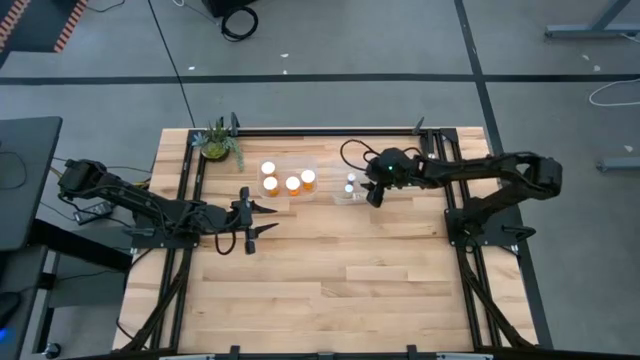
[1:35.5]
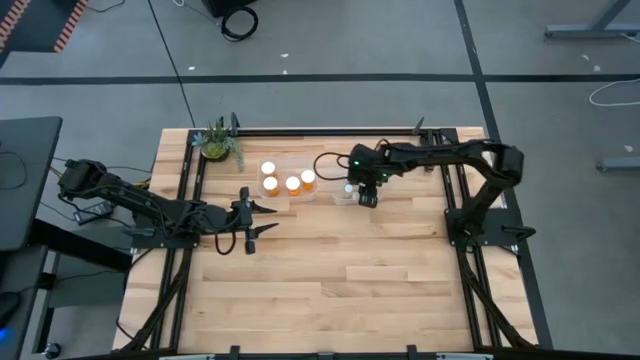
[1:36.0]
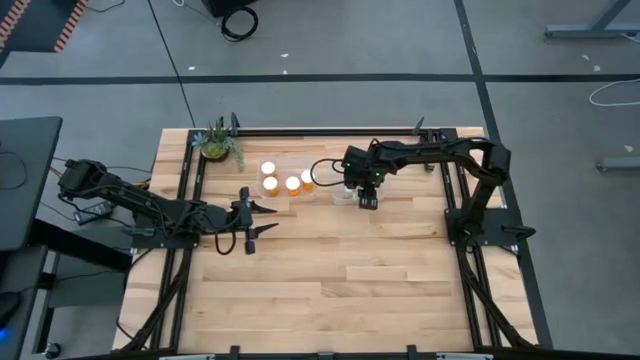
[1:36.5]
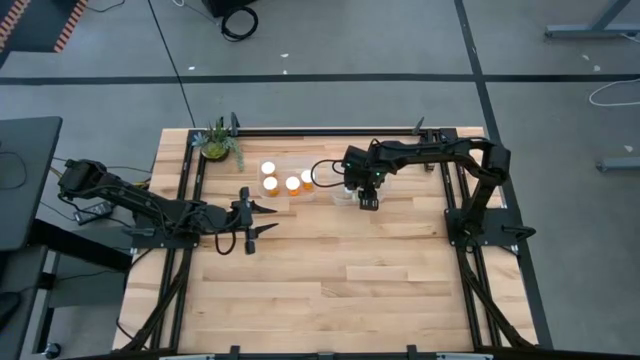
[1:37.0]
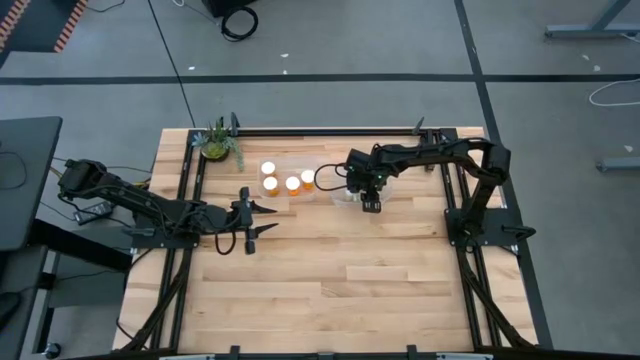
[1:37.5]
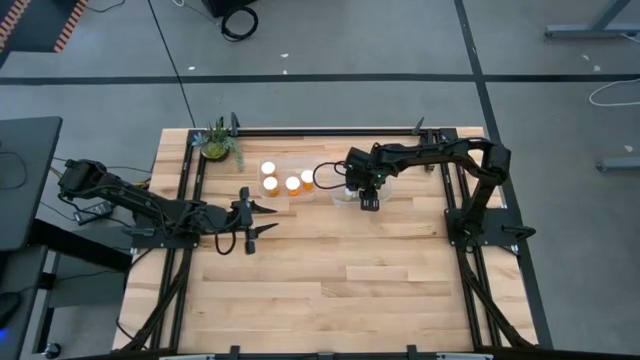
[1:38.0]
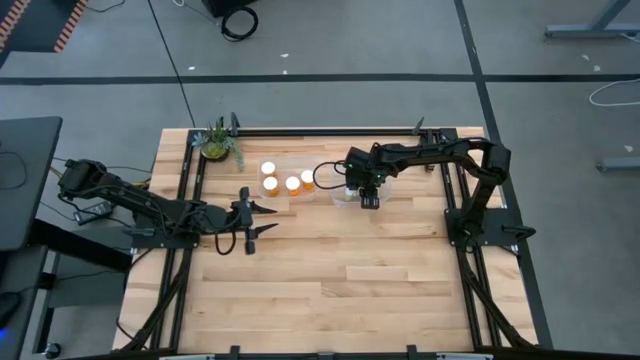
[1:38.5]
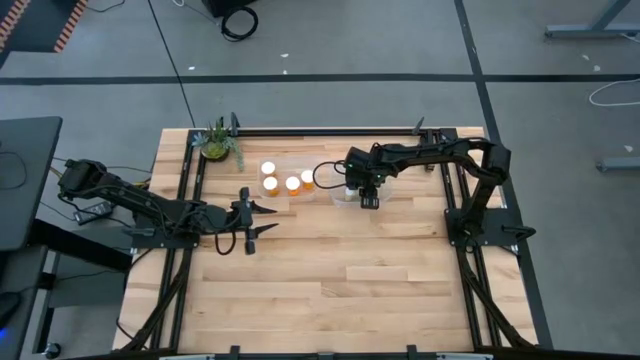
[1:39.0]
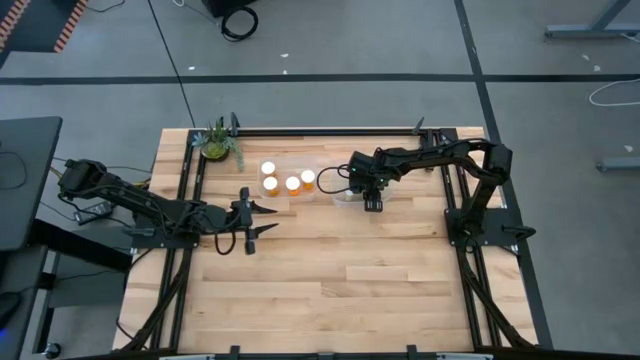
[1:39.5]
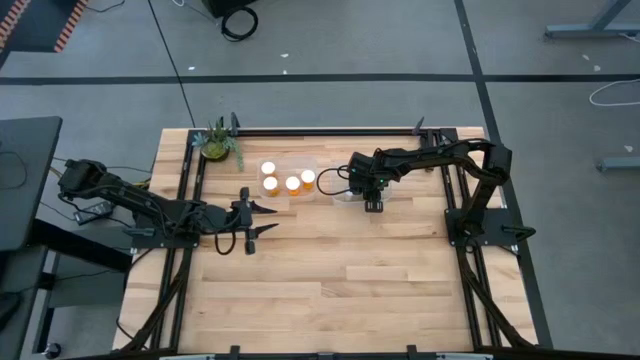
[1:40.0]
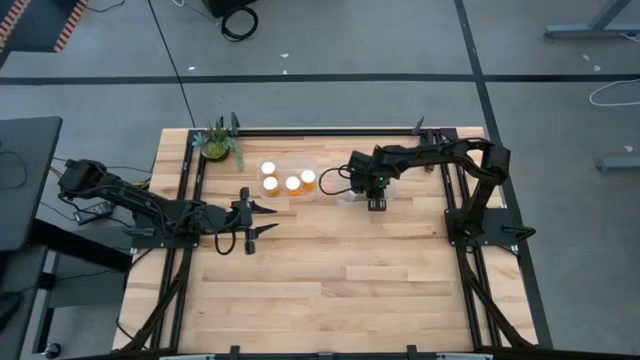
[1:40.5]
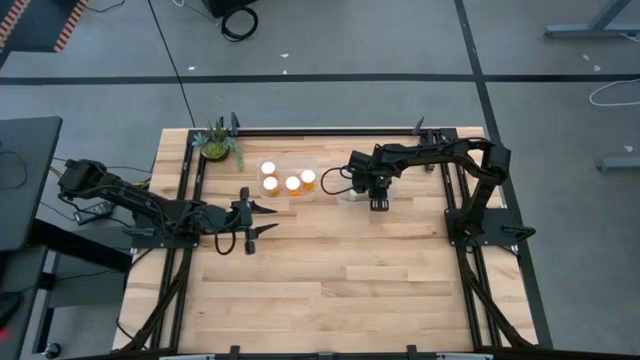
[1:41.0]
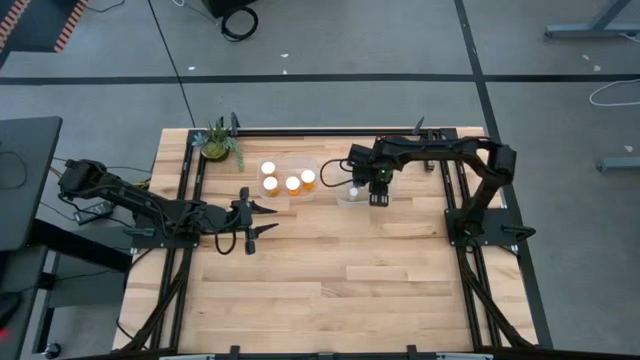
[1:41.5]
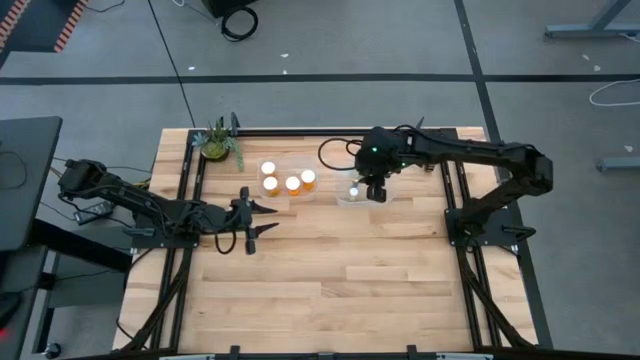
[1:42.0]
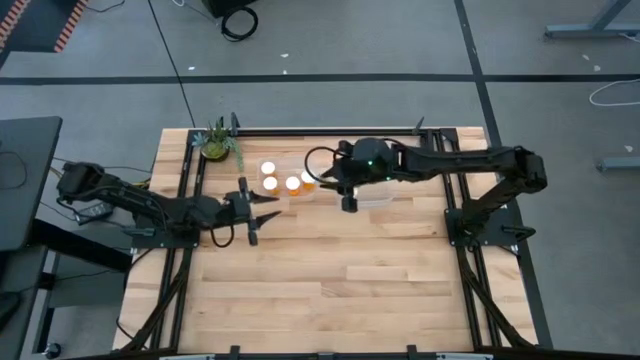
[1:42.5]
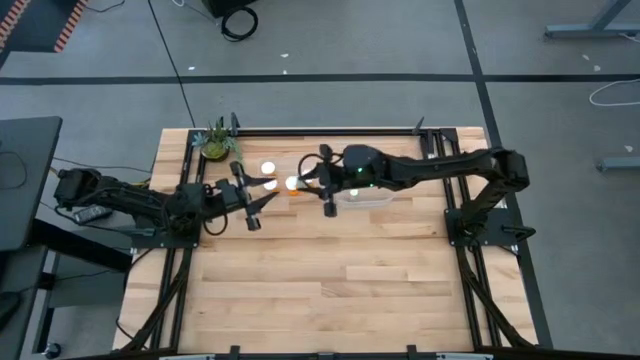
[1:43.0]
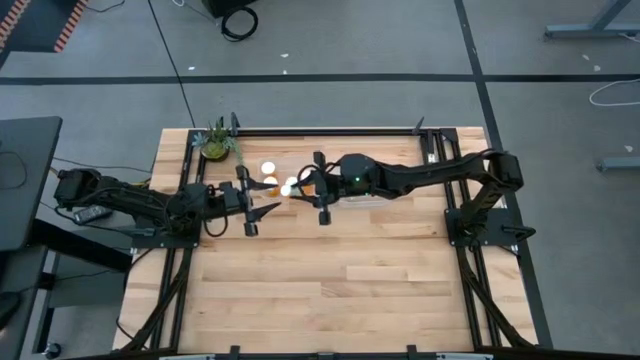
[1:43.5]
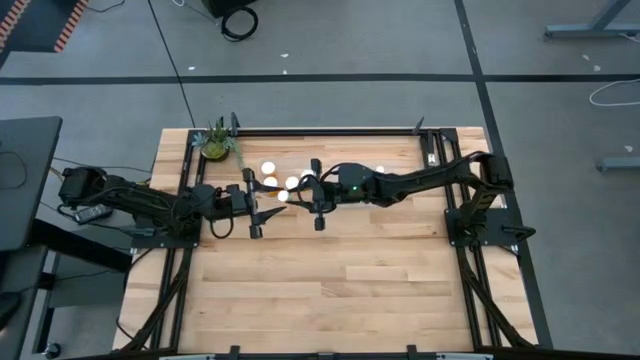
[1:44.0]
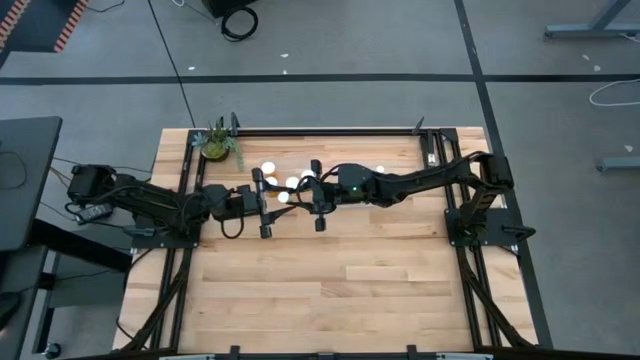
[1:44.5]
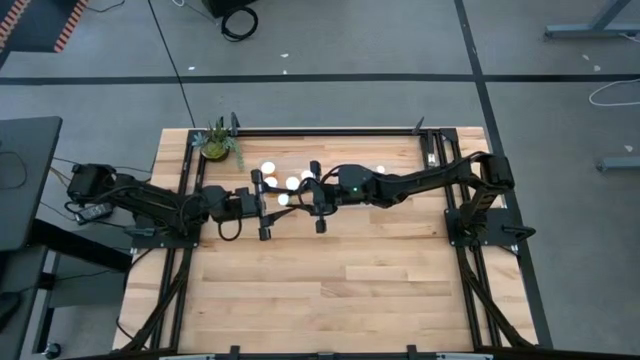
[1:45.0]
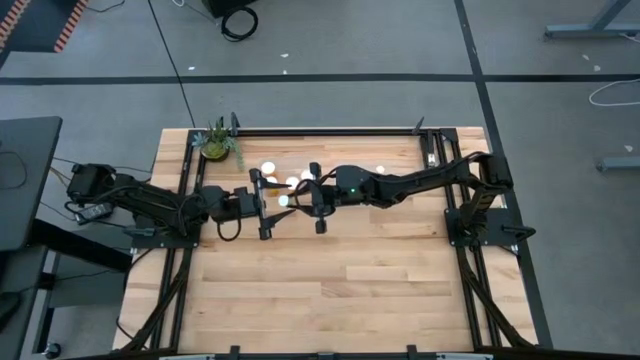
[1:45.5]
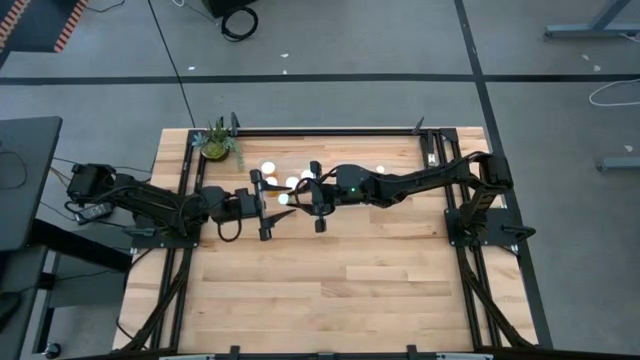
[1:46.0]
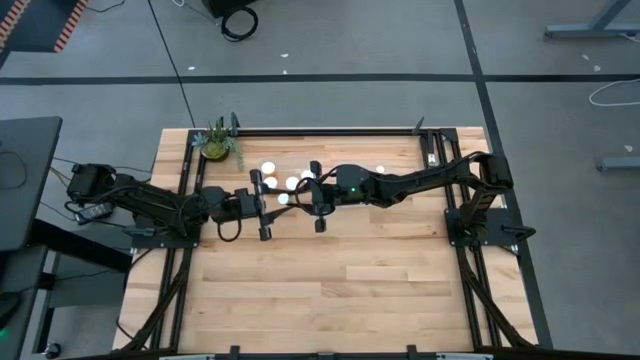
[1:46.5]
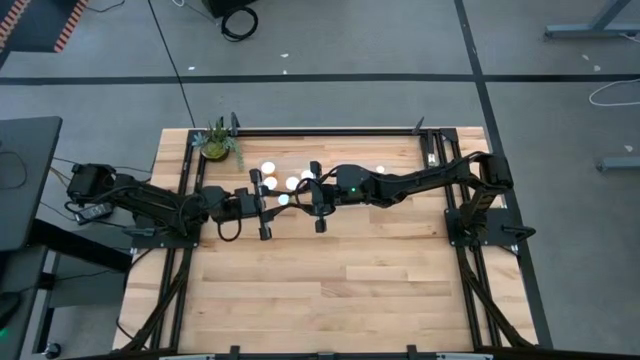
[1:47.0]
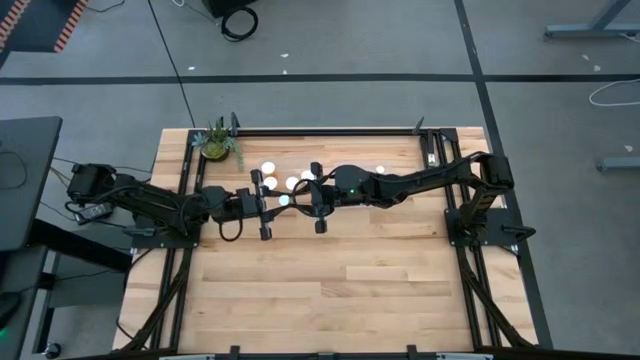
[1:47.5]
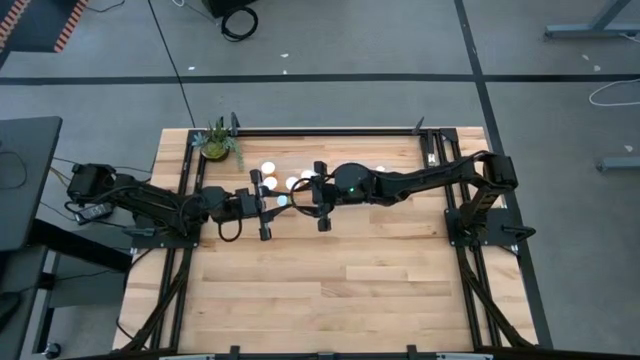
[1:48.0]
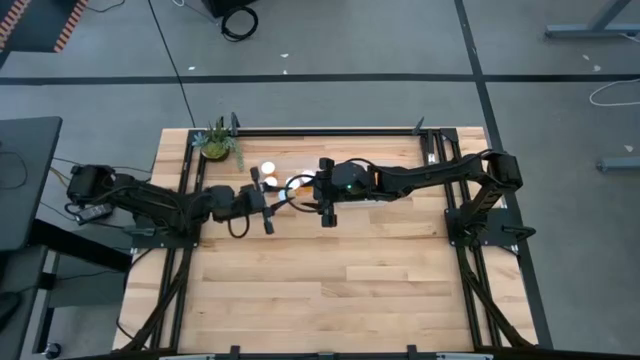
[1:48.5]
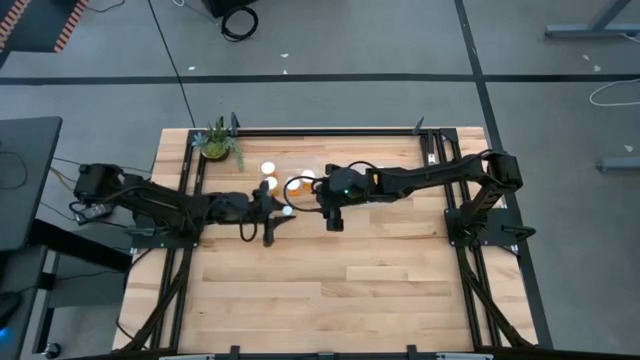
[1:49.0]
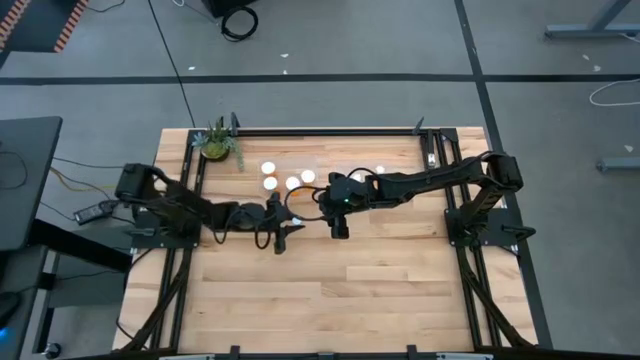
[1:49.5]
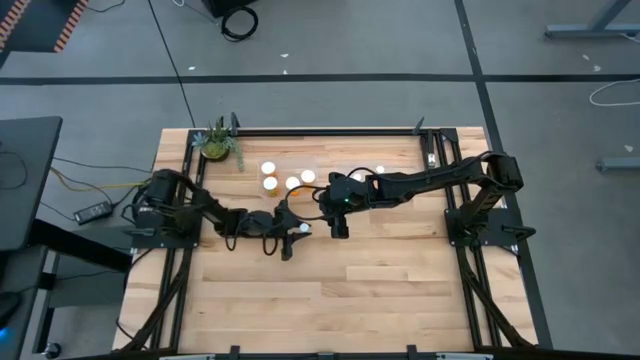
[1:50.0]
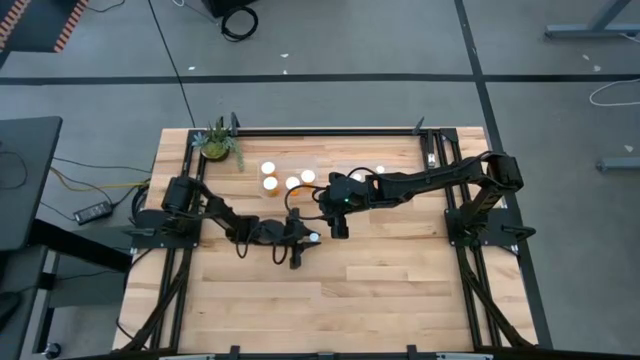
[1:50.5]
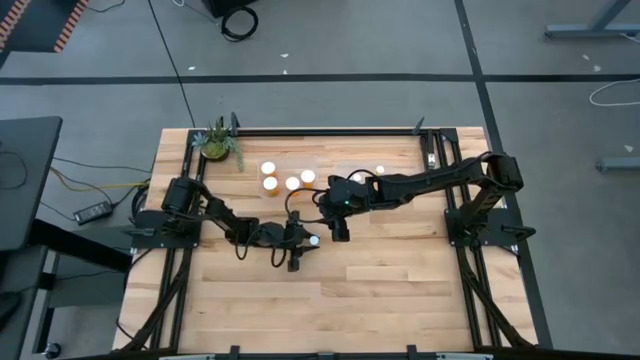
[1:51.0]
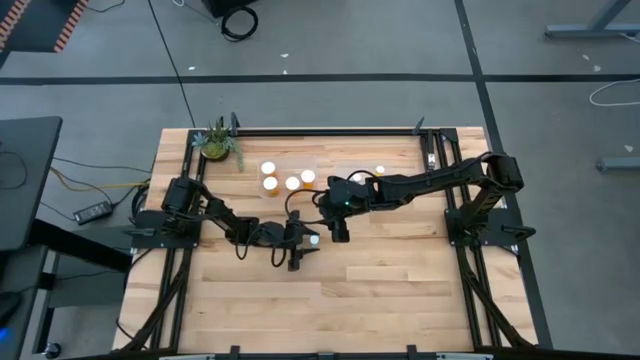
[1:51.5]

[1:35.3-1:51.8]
Task: Pick and place medicine bottles into bin by pill shape (circle, oval)
Remove the small yellow pill bottle from the right transparent bin

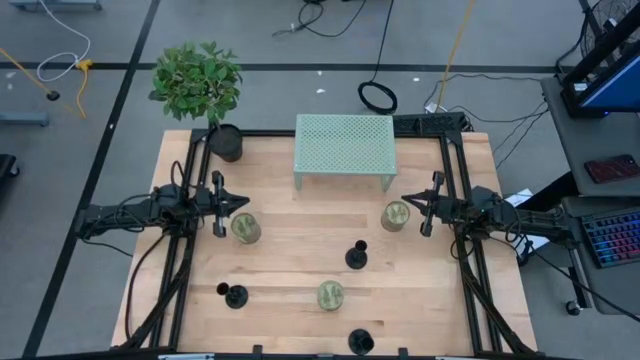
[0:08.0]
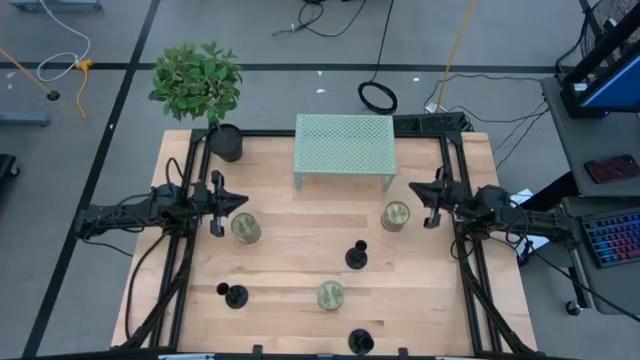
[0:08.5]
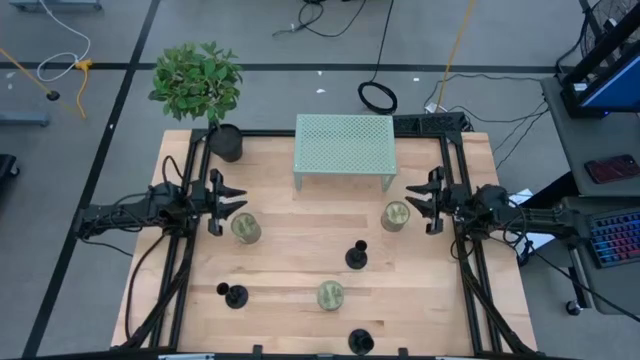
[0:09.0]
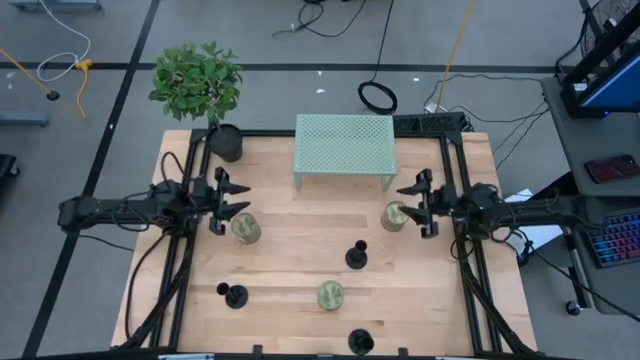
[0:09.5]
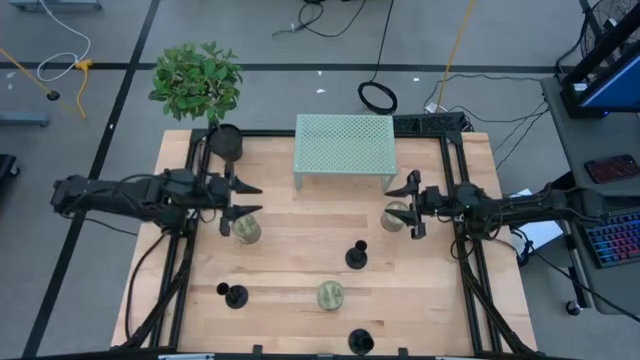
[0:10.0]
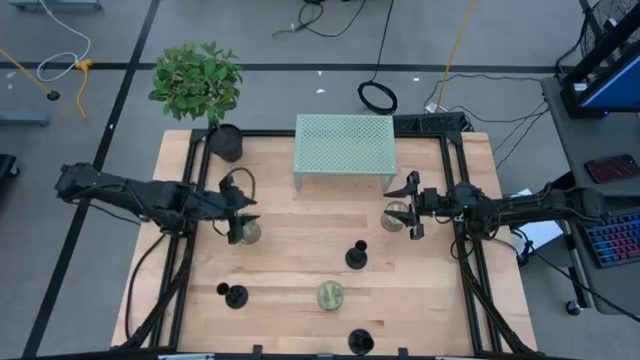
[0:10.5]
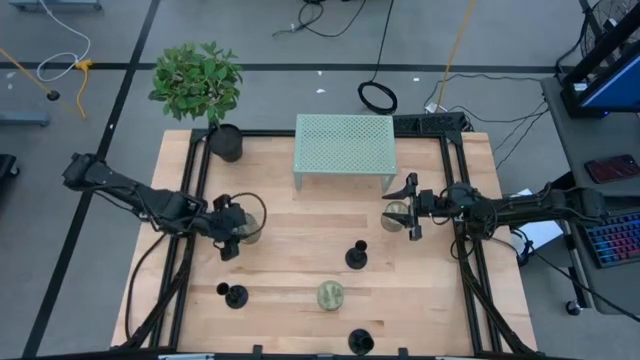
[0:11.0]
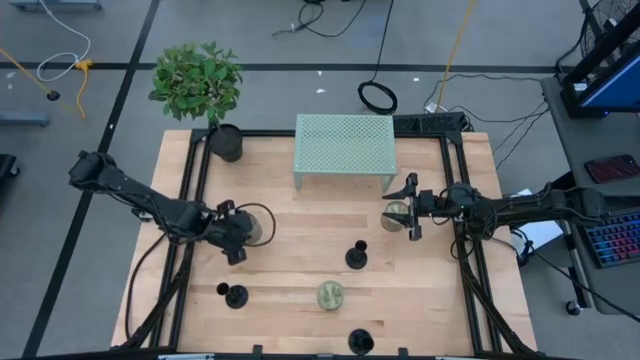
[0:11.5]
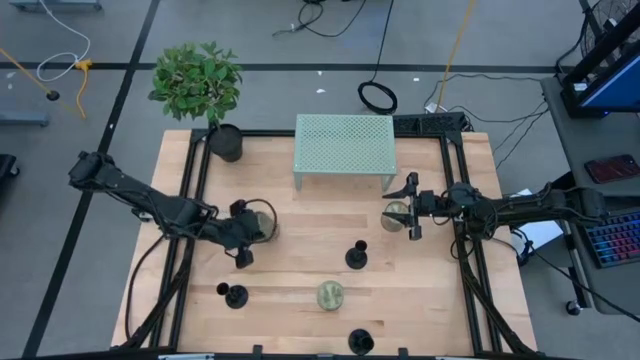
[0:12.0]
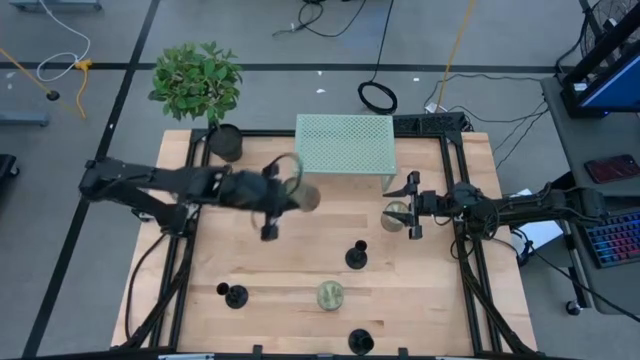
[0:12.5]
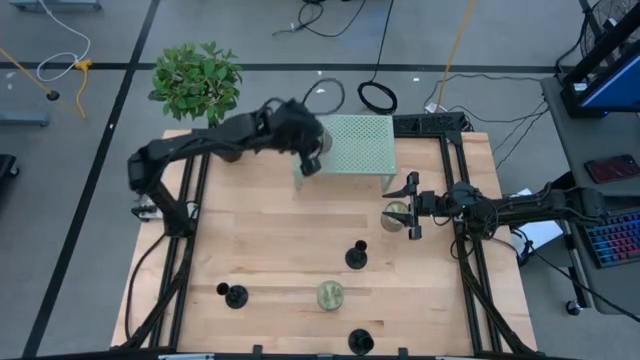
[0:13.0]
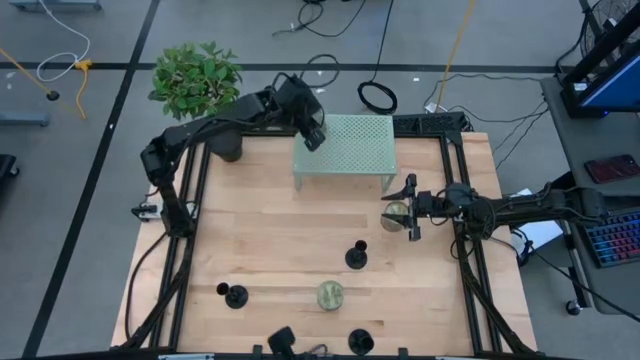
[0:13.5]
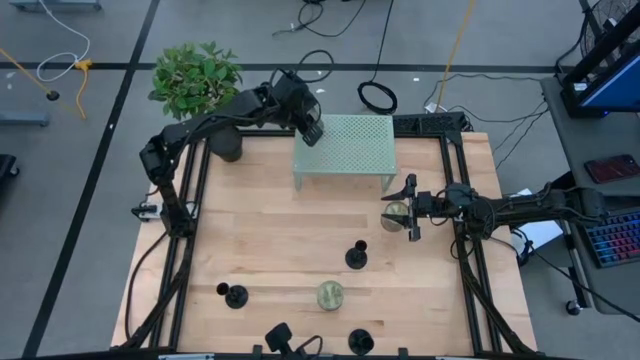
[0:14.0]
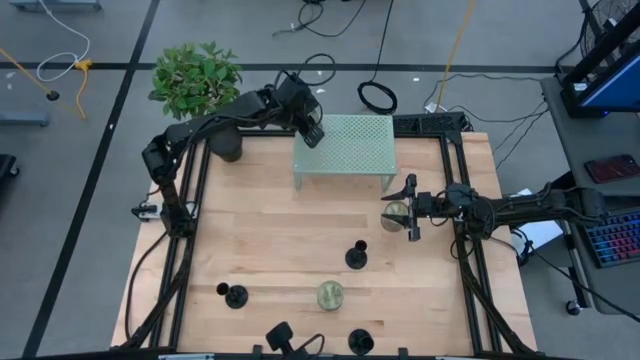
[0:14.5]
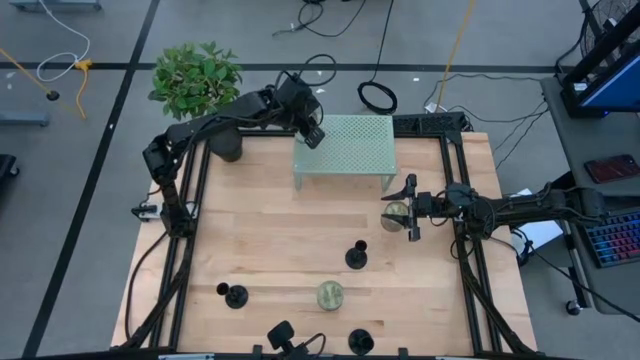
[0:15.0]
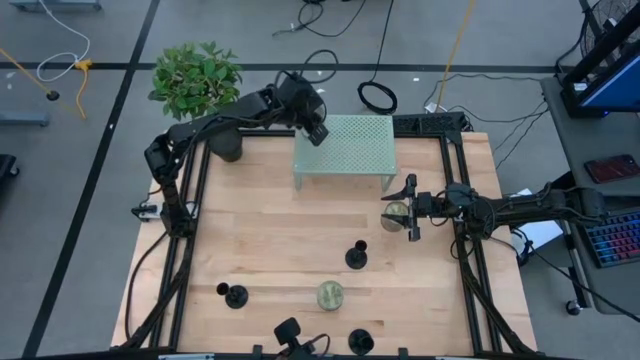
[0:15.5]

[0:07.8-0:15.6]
Task: Pick & Place candle stick holders
Put the top left silver scented candle on the shelf
